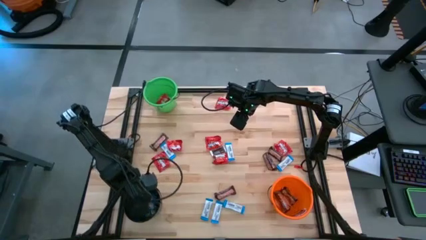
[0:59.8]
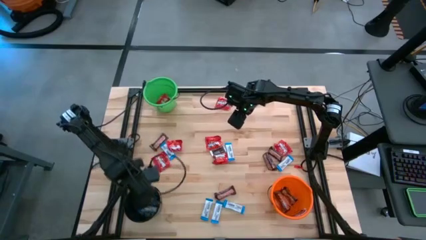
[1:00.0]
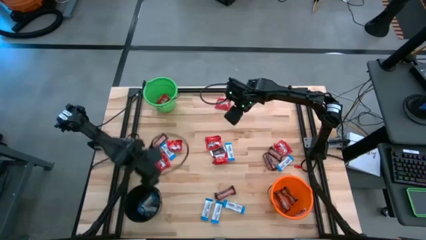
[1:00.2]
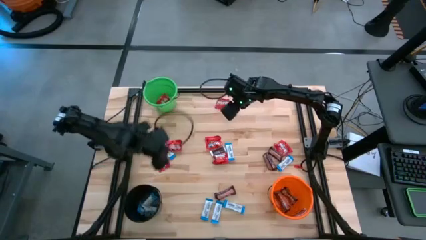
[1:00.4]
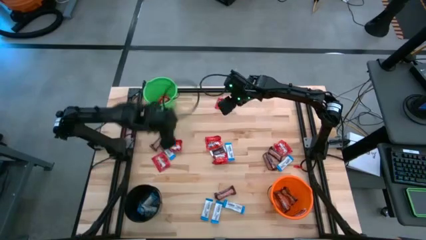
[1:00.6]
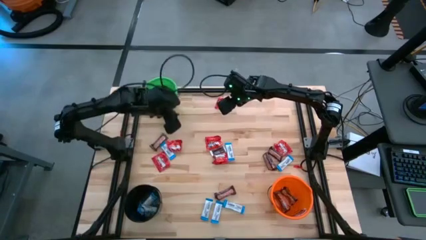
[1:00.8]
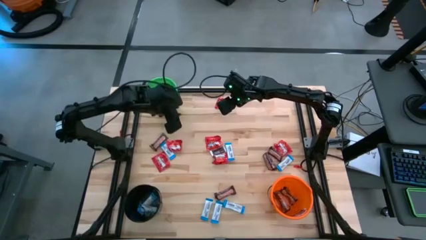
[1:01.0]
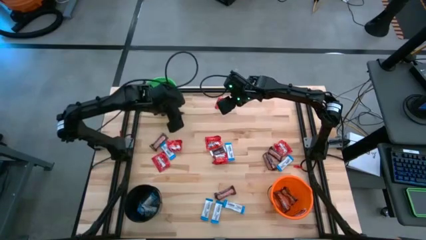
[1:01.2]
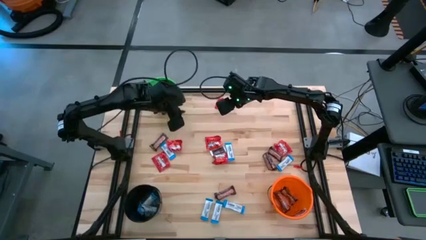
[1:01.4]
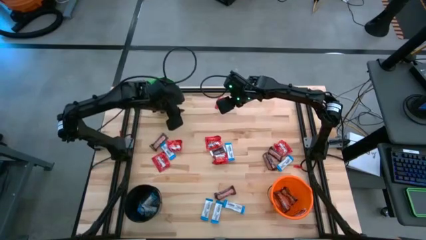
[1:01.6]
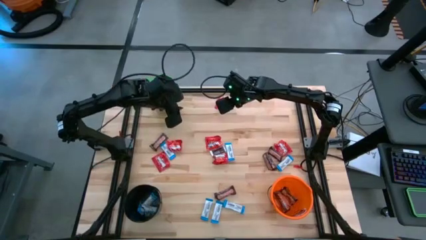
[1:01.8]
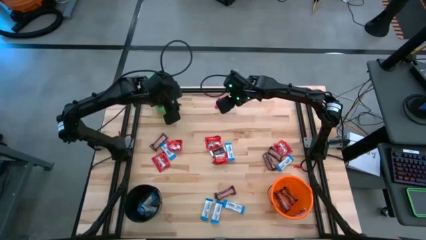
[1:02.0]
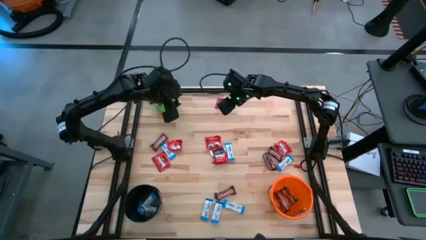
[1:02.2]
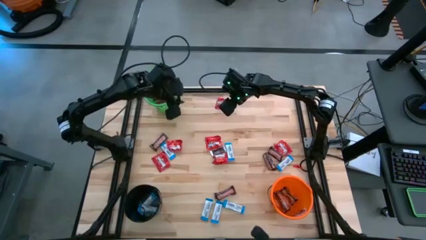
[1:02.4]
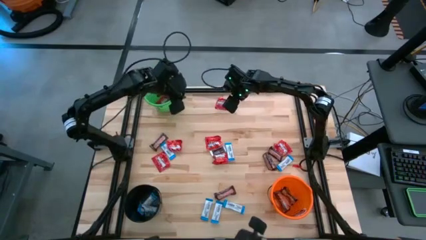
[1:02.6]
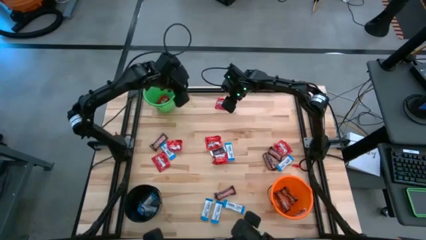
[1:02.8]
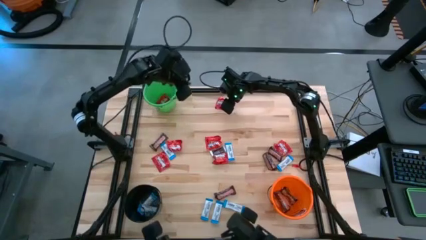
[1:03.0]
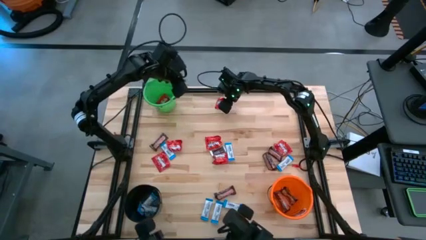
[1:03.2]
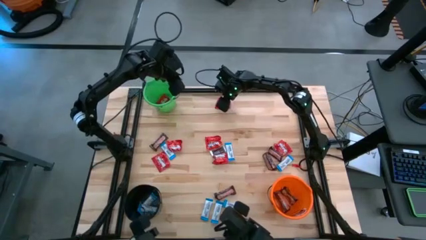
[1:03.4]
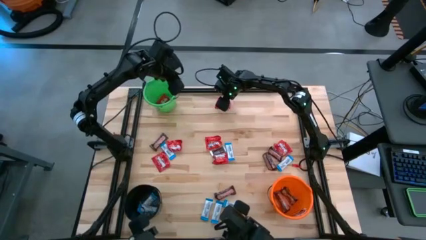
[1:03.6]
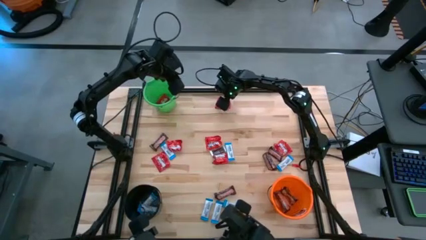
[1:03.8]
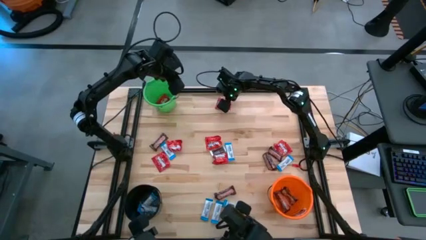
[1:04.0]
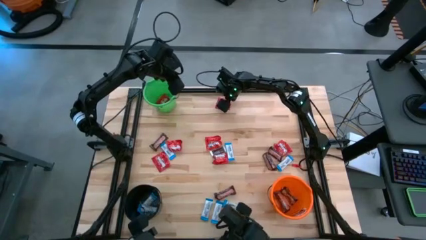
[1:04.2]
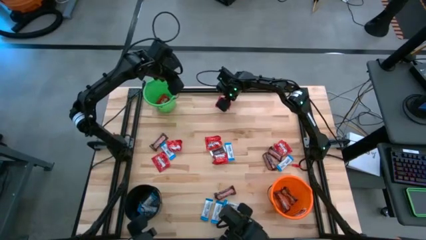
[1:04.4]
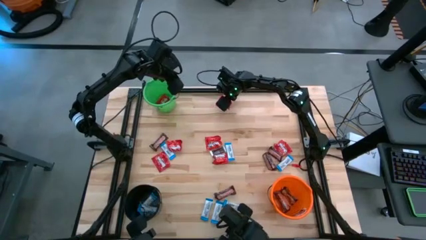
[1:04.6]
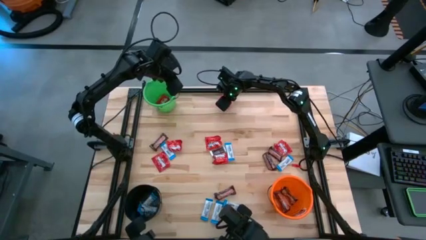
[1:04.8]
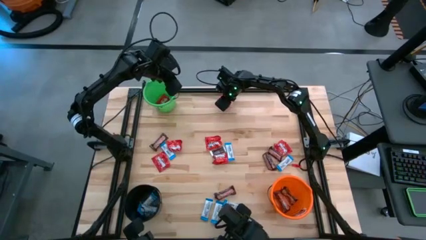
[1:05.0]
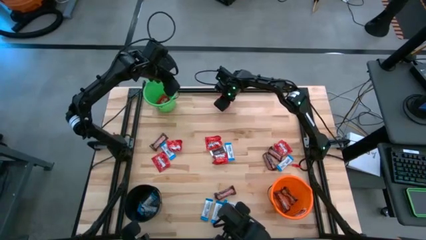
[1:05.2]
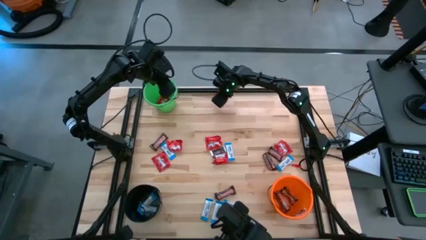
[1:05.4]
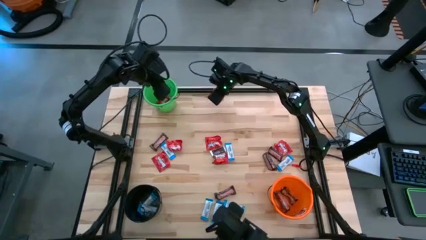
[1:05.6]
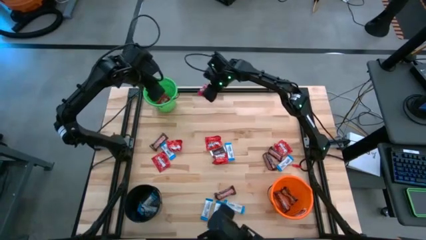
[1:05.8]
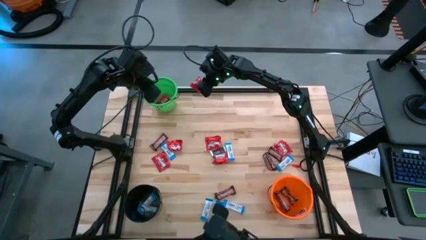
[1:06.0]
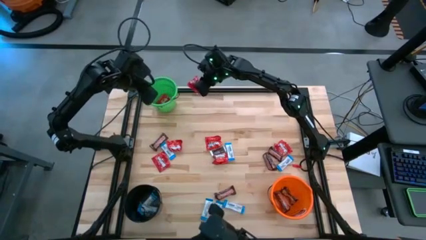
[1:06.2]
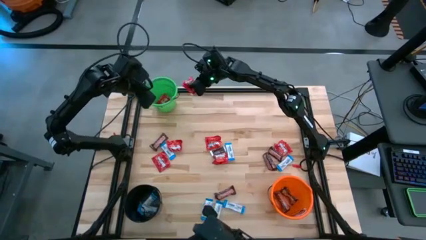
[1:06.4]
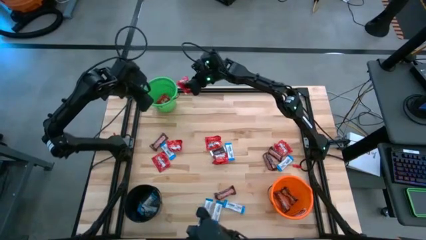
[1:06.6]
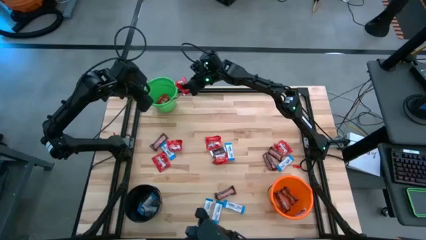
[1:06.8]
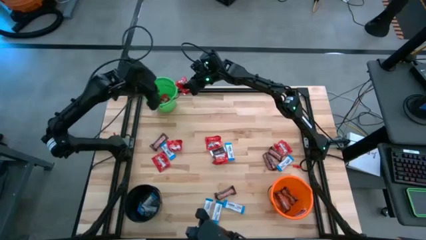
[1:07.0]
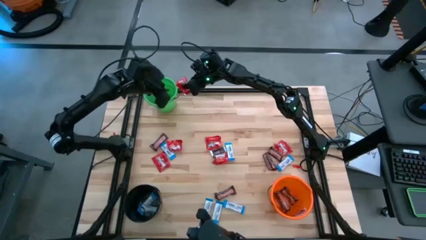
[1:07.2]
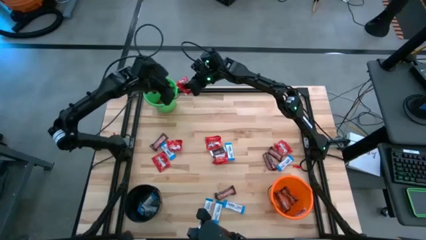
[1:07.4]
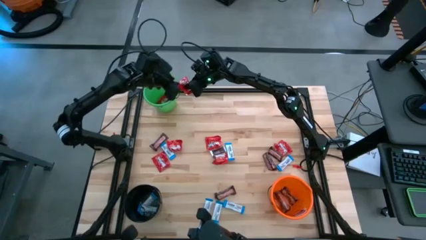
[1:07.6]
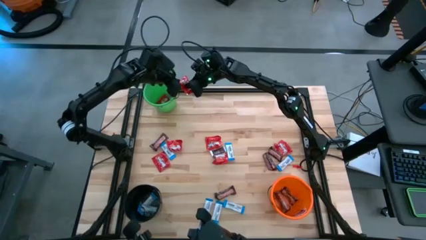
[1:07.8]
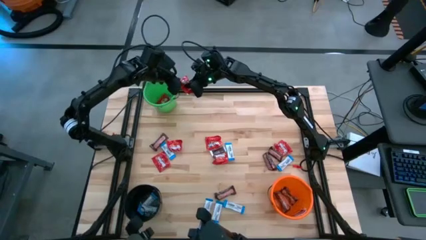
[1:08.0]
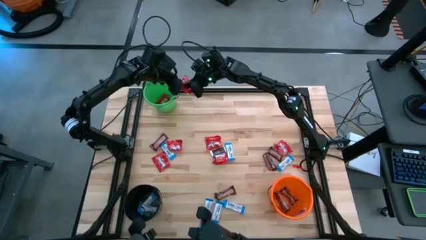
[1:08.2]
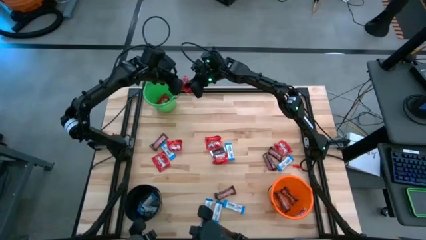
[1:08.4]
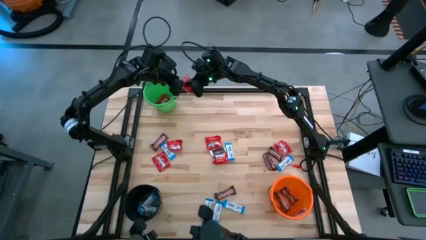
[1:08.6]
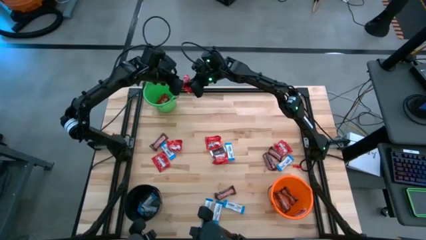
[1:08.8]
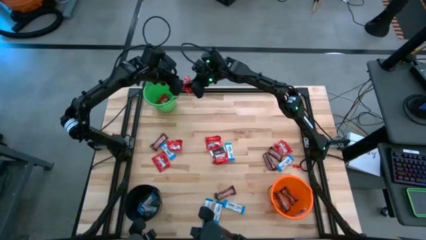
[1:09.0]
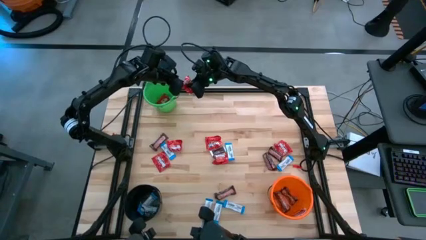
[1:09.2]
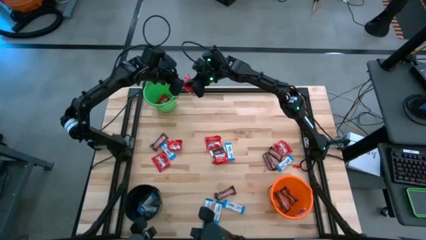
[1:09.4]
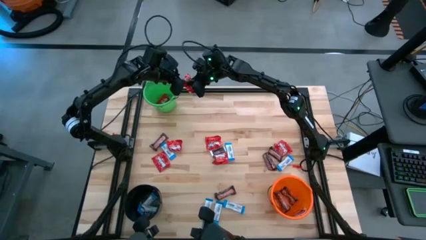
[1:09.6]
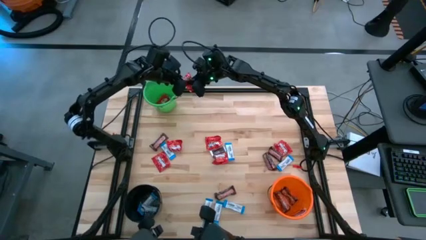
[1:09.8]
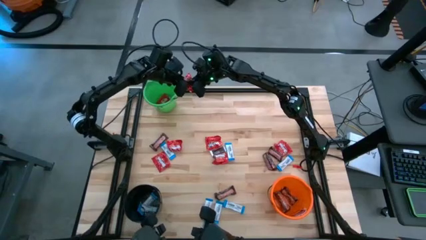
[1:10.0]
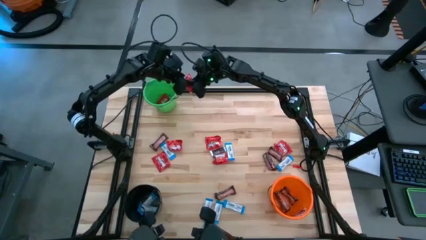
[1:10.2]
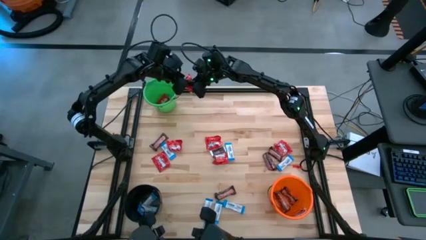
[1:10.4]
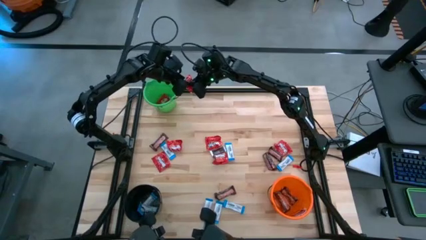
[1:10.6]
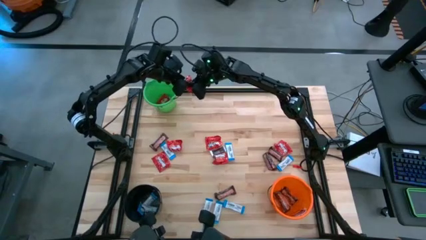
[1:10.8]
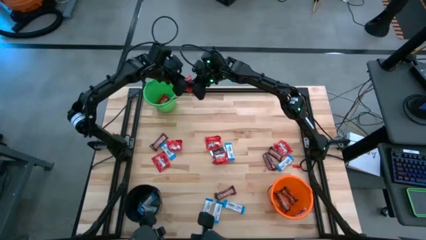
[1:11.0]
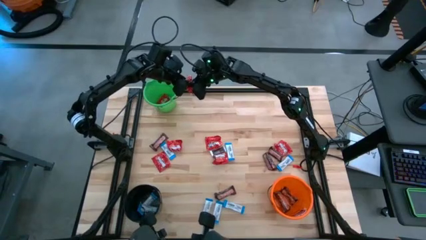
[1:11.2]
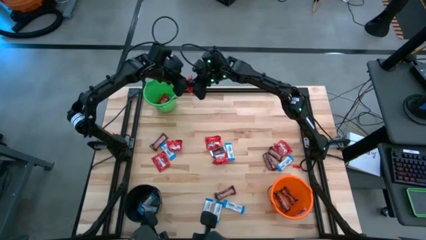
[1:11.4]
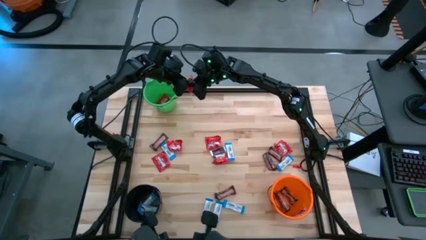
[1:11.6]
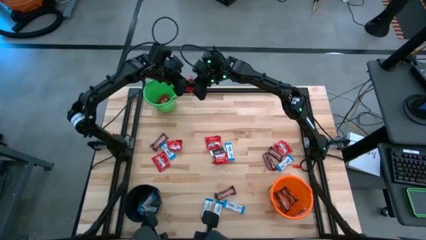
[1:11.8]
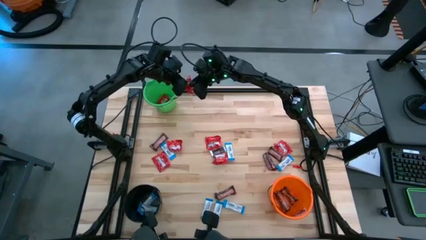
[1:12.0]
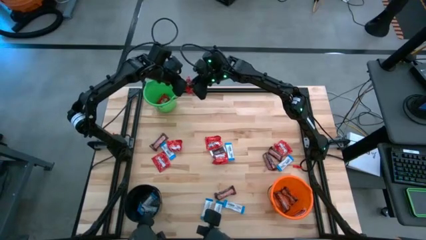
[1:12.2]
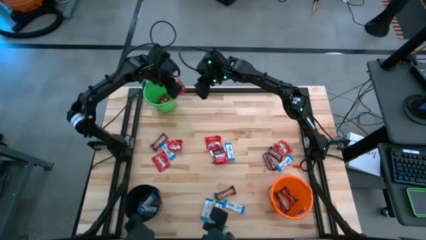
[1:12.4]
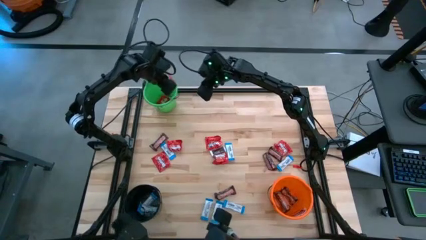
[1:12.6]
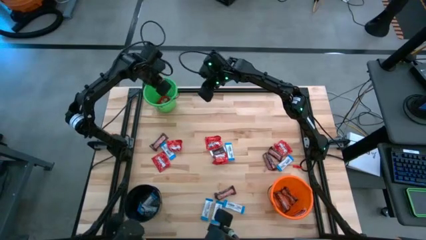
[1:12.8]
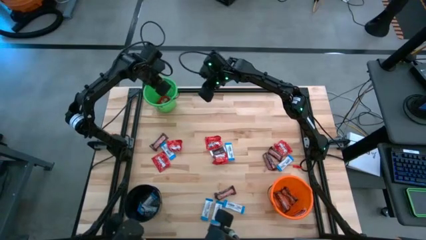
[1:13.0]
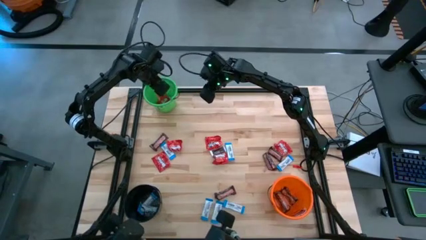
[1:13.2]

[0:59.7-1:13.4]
Task: Sort candy
Put the red candy into the green bucket

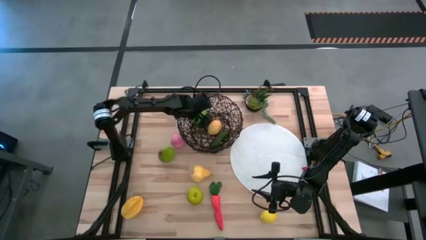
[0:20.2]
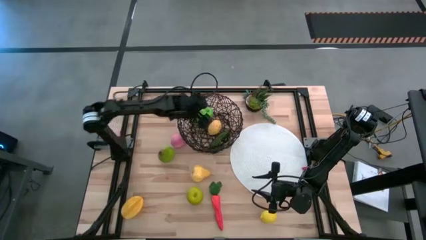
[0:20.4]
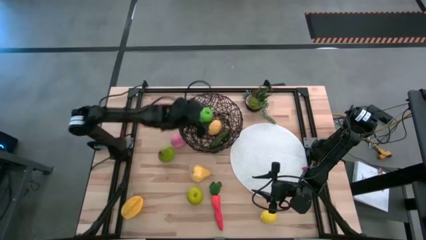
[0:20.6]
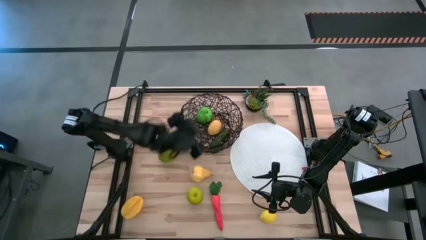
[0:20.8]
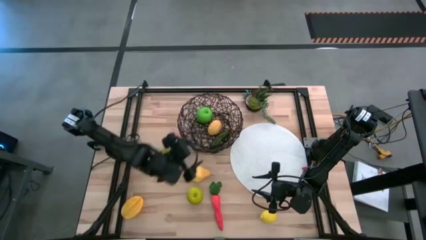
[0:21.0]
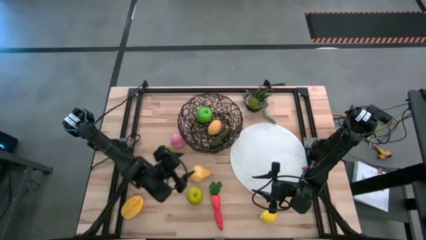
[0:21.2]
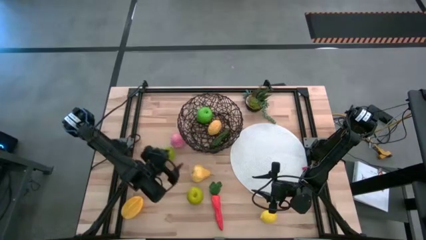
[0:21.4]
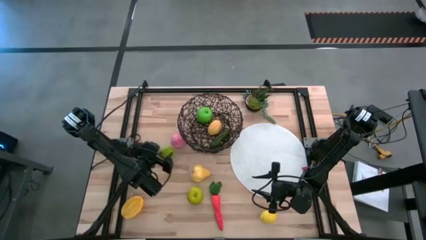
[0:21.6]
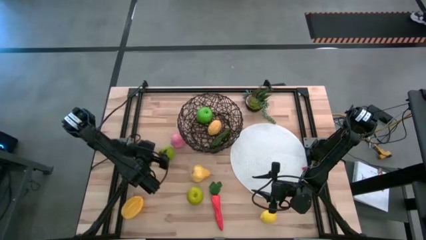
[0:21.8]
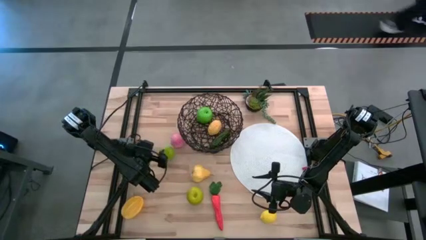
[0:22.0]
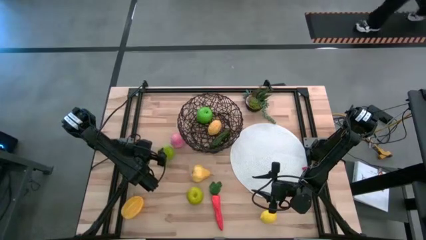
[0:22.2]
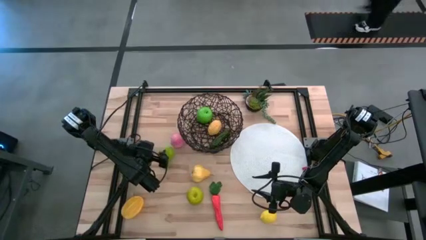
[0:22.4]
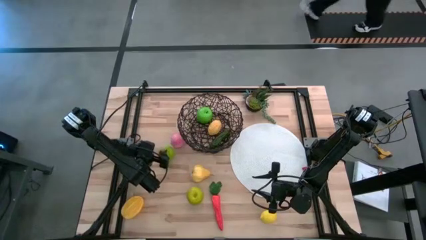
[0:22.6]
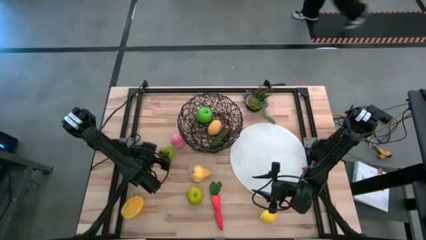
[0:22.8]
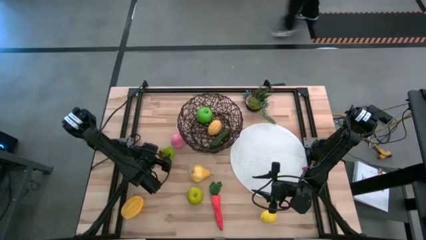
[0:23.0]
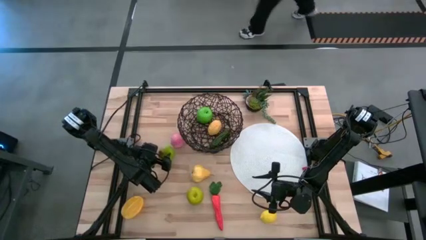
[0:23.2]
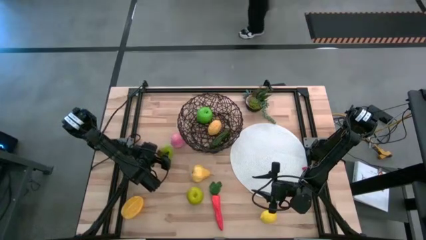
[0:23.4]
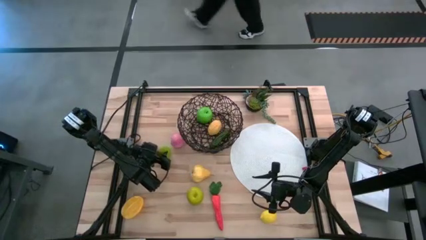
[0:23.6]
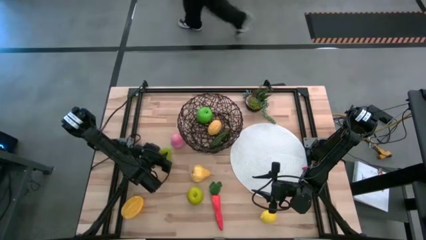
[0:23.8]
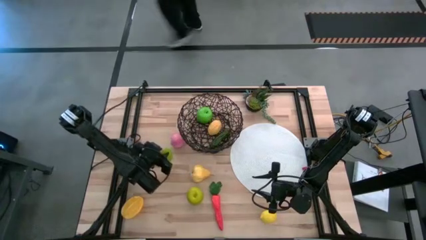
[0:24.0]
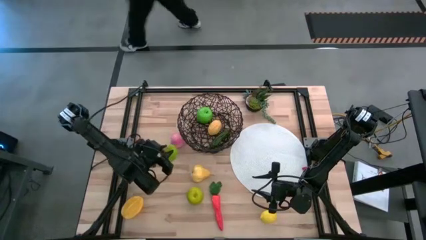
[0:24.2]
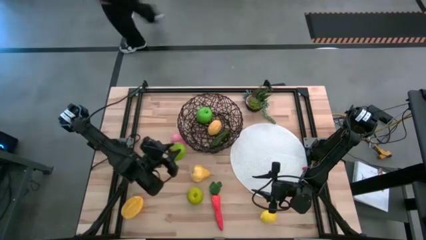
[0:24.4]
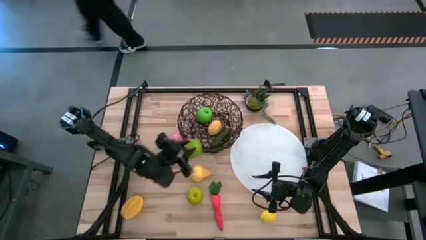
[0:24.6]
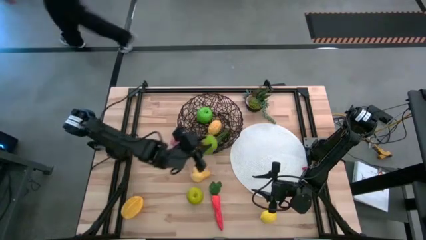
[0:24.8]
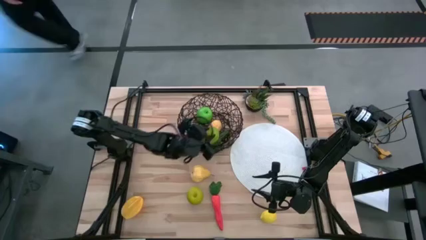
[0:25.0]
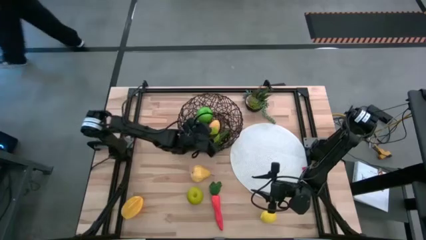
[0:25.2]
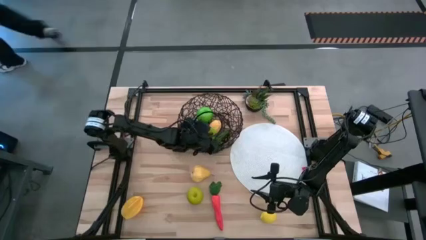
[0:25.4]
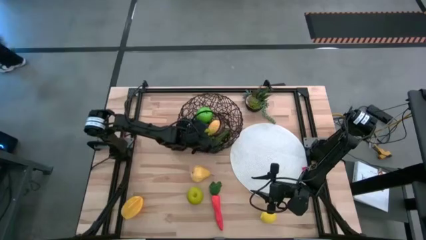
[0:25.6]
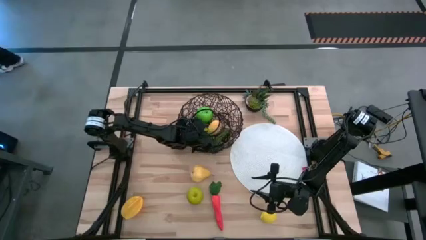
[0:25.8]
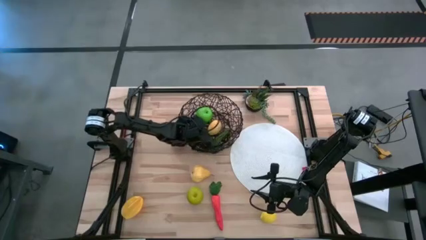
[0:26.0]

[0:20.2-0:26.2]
Task: Build produce basket
Put the green pear into the wire basket
